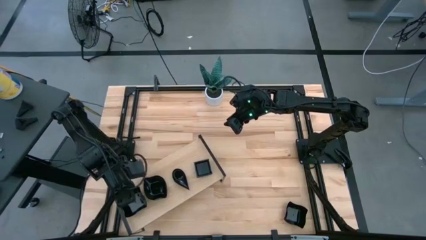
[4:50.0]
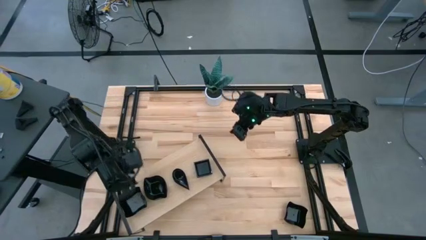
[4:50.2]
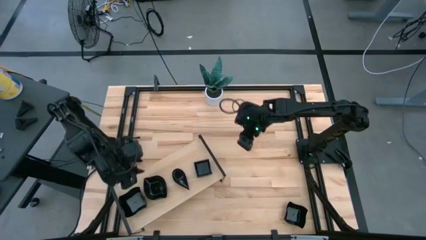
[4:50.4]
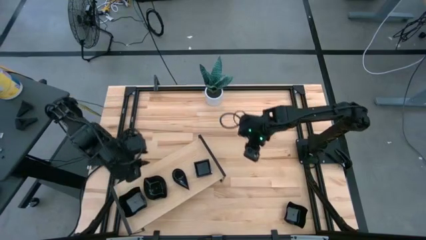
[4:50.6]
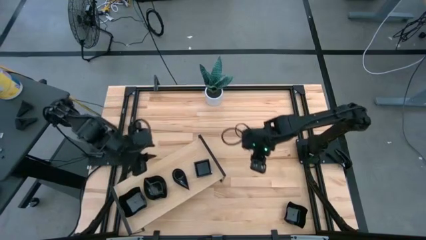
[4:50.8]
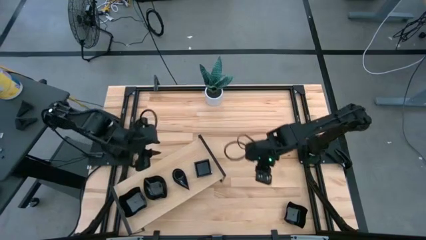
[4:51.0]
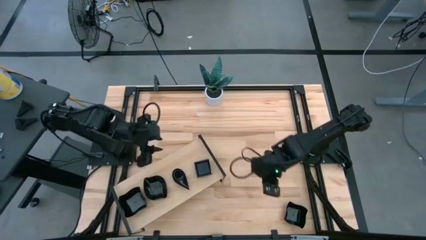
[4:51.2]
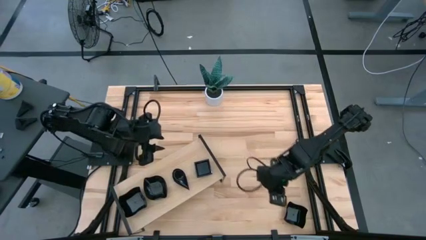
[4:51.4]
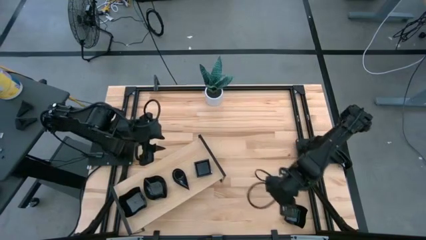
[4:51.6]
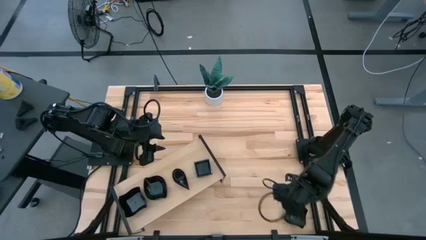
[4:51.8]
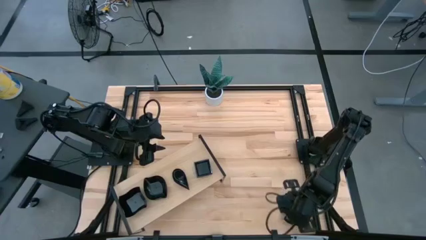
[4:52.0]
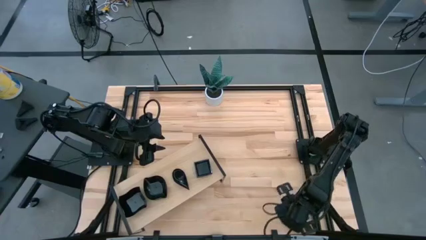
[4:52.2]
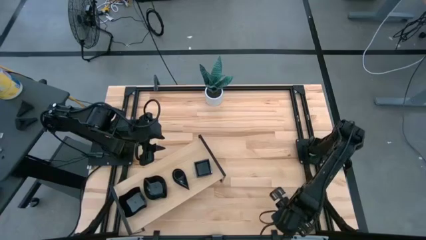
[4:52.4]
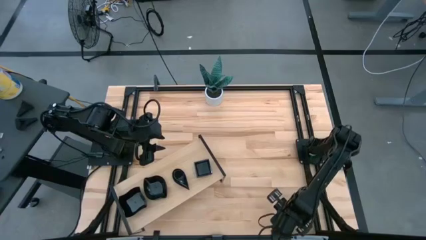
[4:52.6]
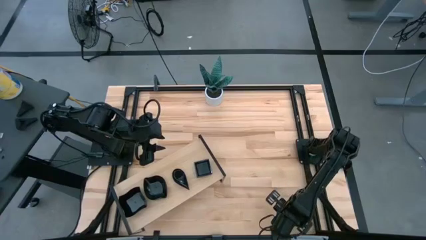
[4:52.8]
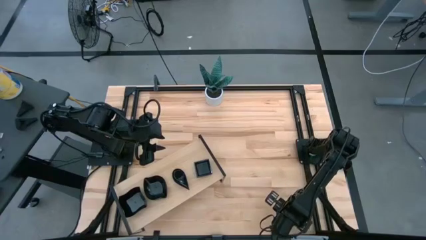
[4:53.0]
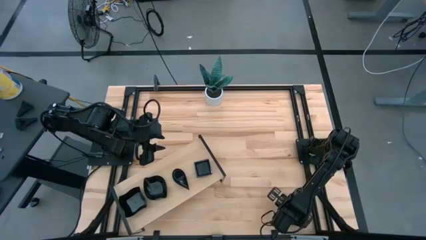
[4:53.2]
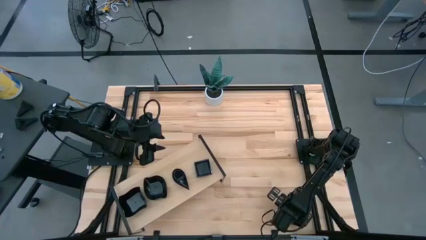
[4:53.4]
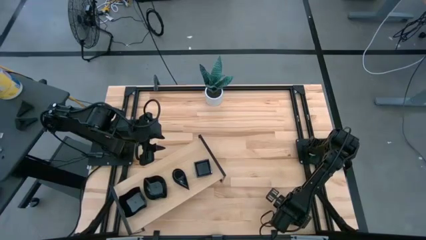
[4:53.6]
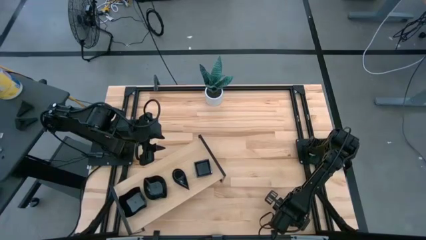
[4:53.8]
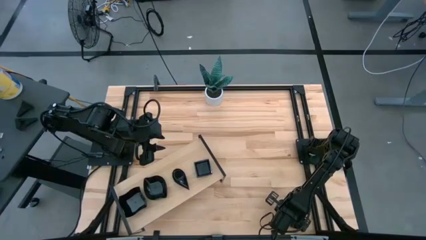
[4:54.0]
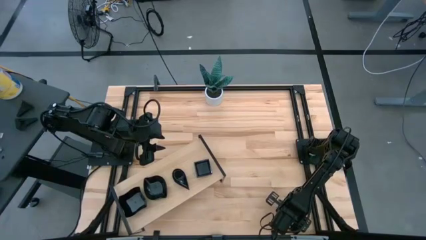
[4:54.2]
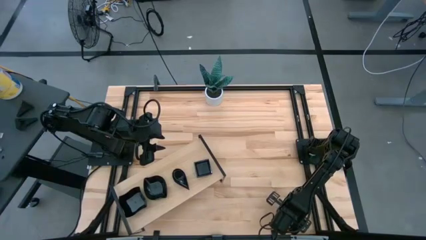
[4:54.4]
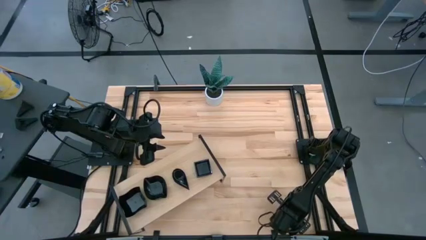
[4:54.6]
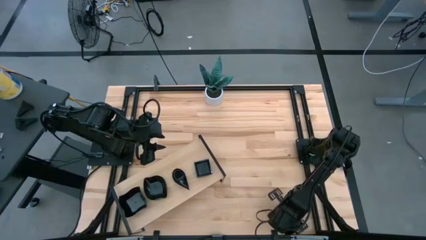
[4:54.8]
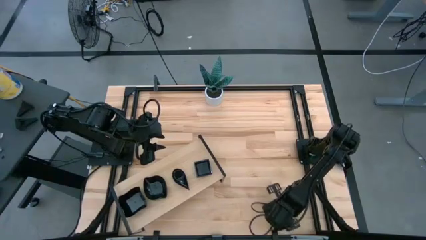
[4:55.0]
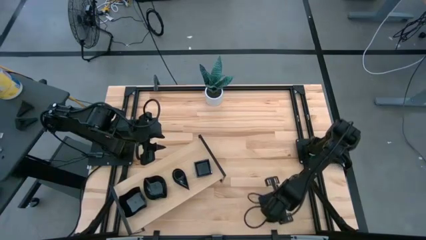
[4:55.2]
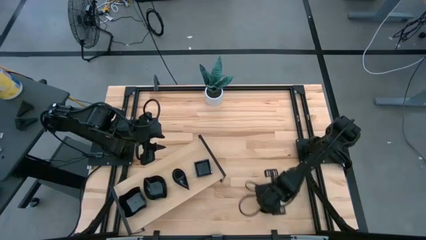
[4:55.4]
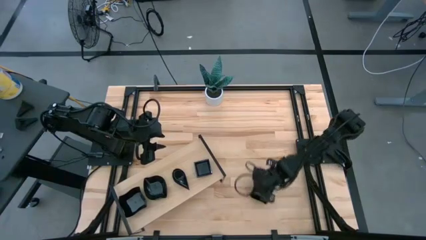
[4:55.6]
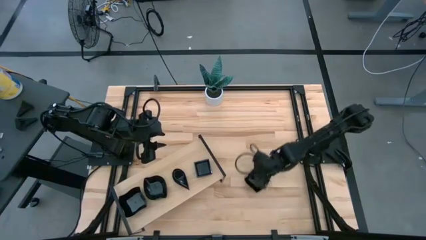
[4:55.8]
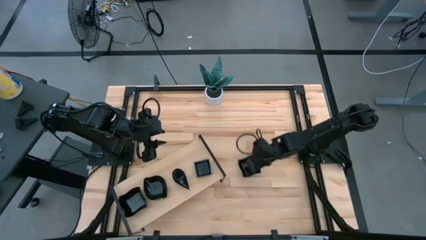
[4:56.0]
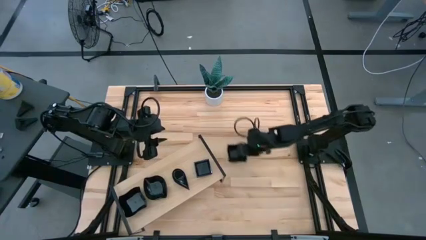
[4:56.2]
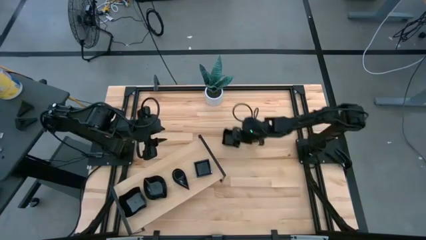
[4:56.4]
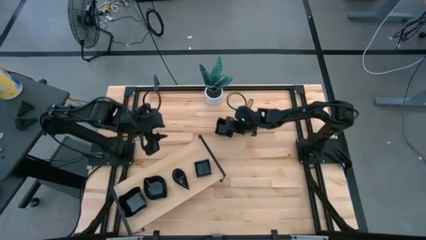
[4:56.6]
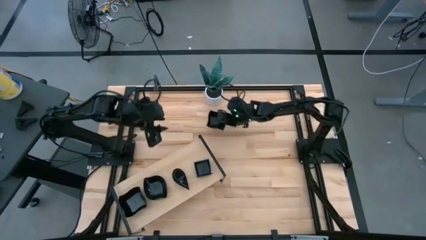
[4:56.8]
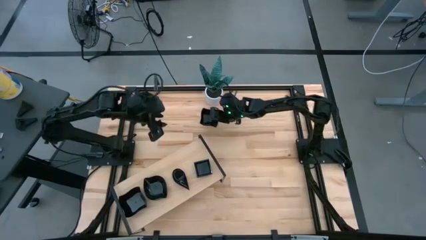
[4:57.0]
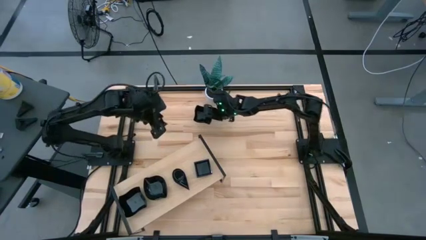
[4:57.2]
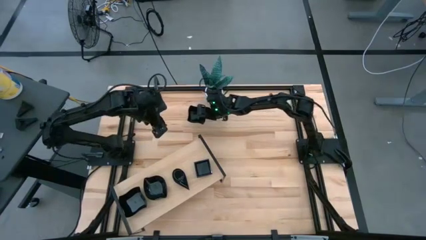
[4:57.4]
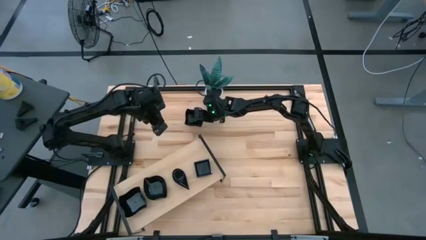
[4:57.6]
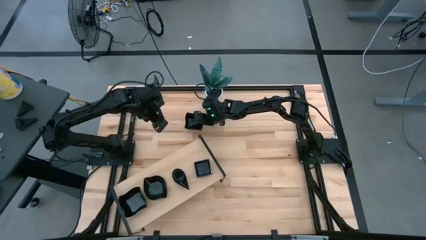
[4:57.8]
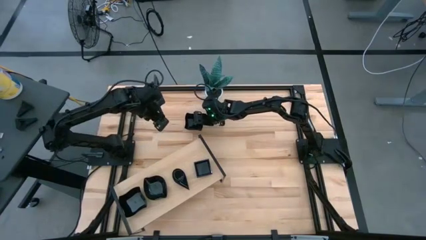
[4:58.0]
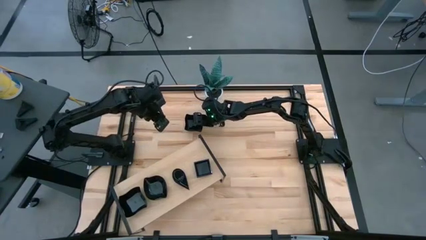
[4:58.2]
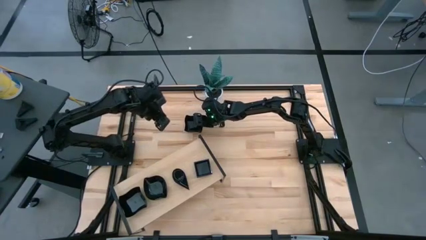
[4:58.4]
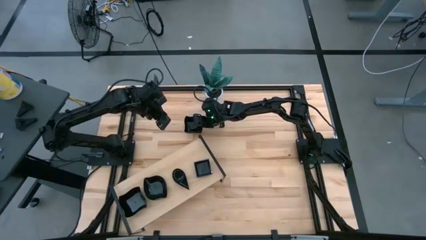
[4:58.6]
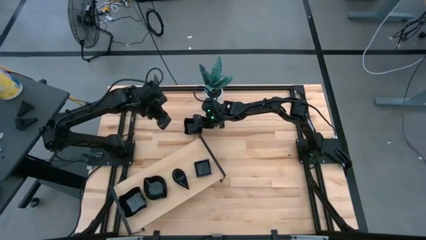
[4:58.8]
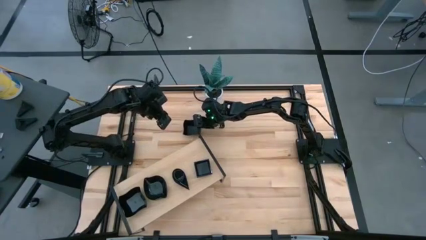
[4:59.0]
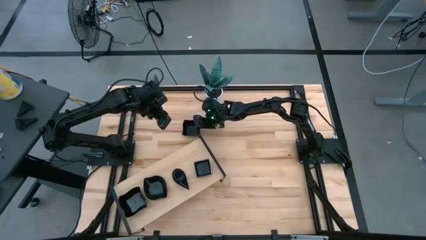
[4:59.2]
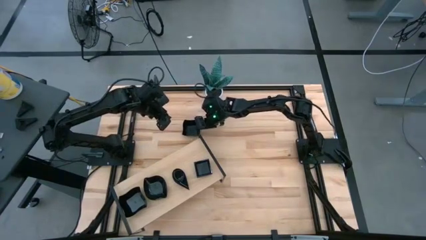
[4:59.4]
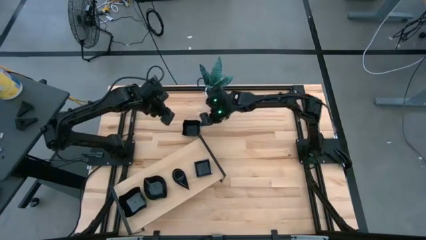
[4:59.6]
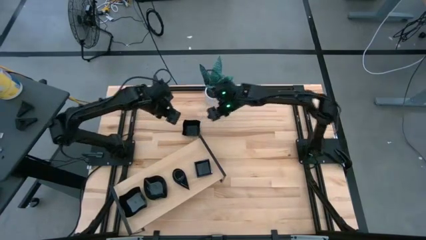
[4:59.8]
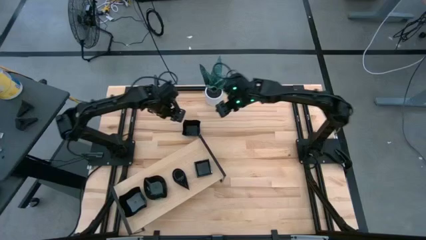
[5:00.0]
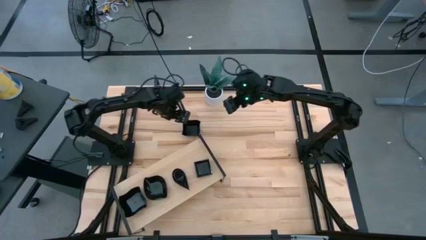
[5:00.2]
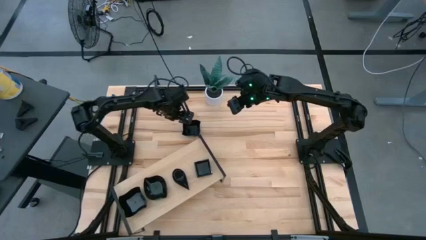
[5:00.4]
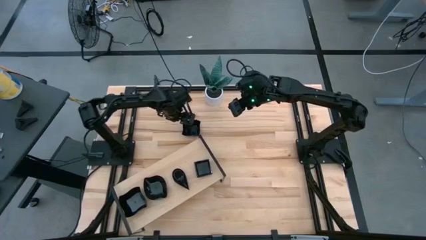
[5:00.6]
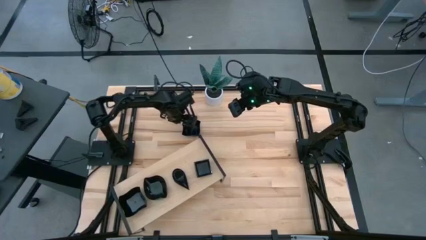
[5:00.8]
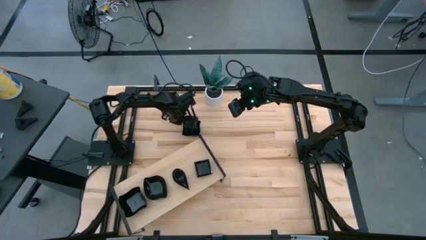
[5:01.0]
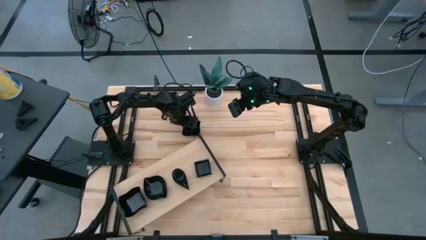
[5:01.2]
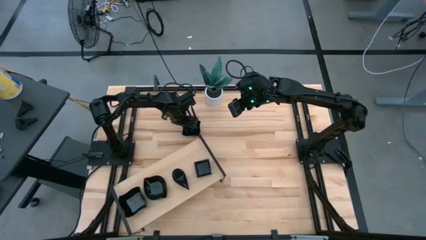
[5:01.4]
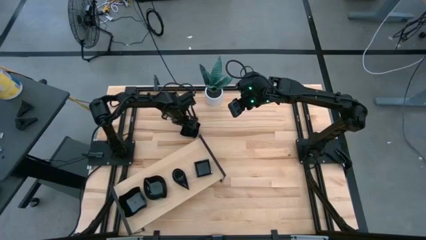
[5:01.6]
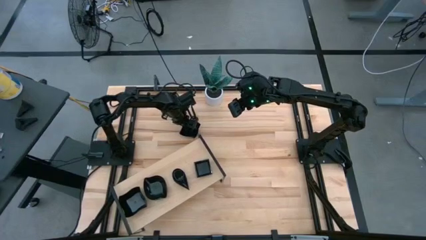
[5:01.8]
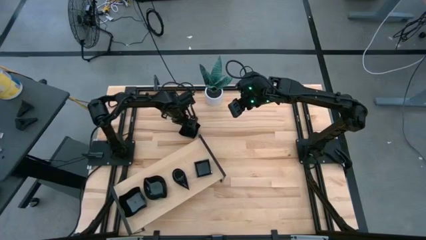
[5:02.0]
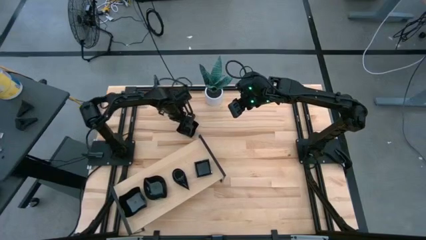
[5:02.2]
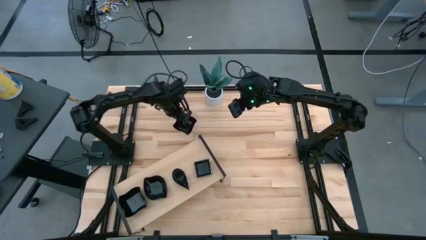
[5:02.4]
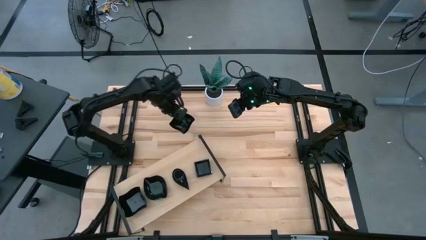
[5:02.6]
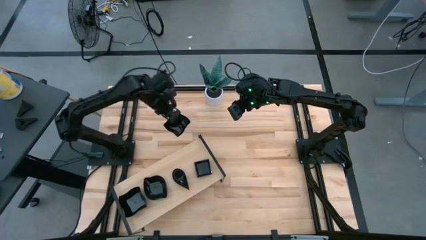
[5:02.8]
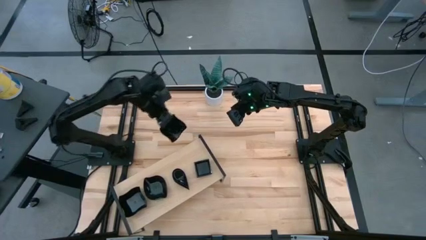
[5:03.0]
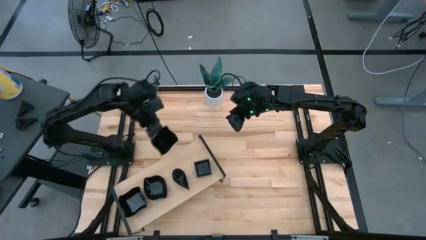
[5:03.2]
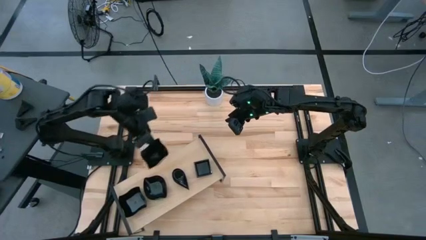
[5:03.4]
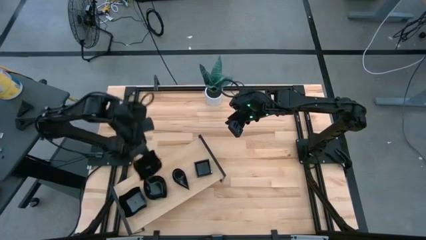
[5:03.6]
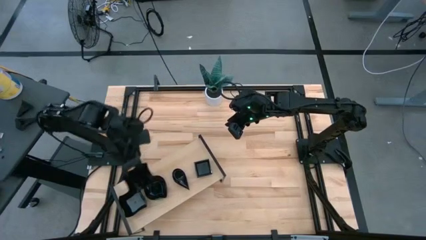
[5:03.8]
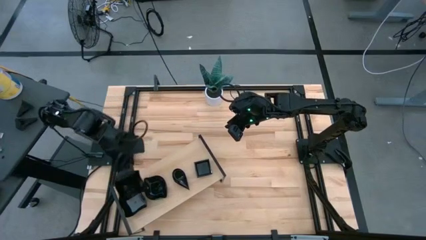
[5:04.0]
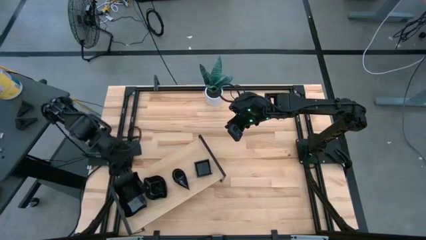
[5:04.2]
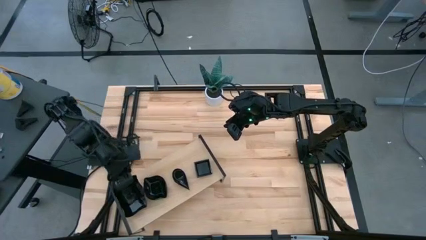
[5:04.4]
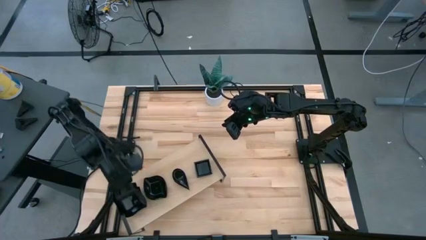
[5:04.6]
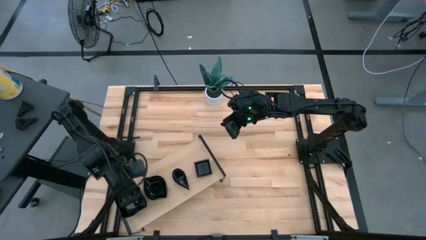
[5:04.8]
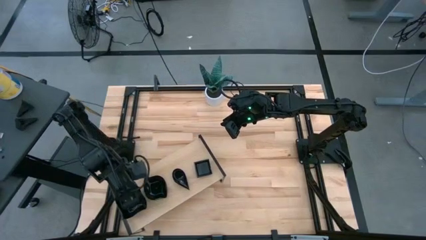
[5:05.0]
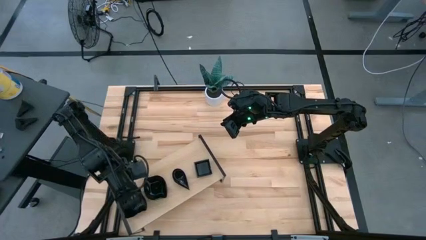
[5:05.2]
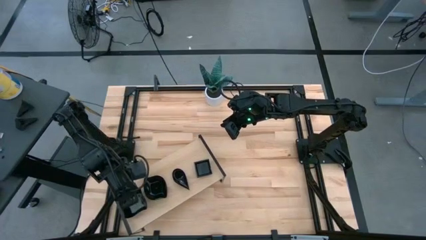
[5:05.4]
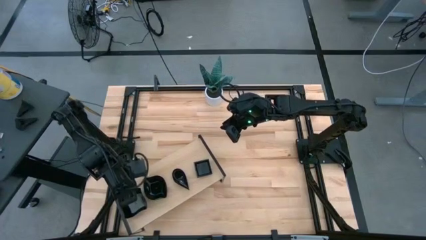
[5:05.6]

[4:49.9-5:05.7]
Task: Pick & Place Mini shaped plates
Stack the black distorted square plate on top of the black distorted square plate on the shelf
